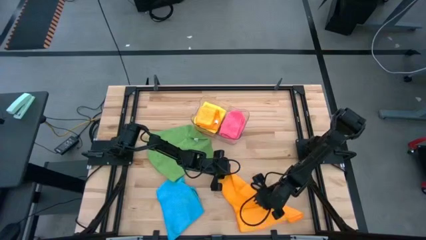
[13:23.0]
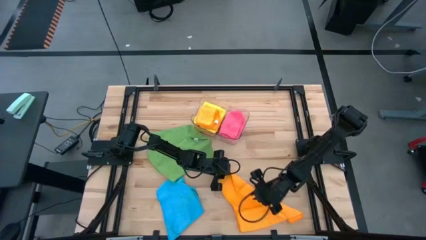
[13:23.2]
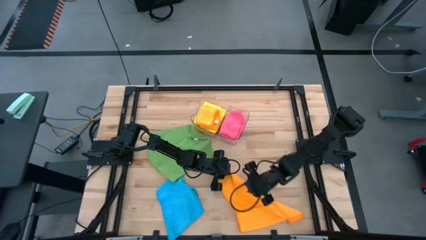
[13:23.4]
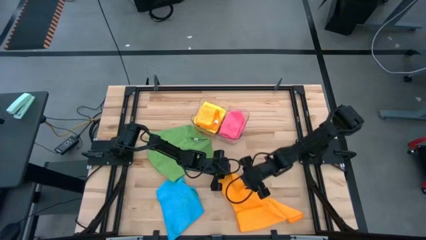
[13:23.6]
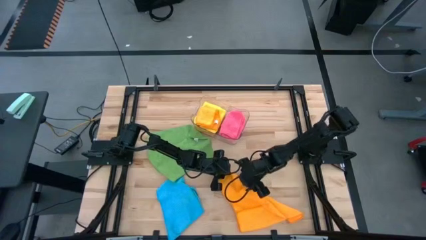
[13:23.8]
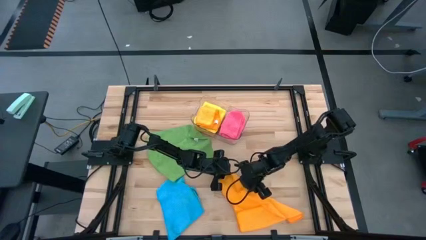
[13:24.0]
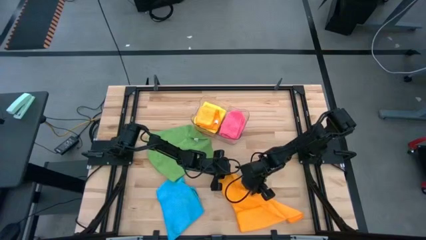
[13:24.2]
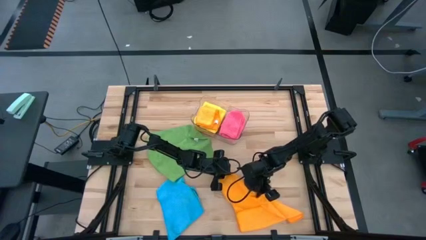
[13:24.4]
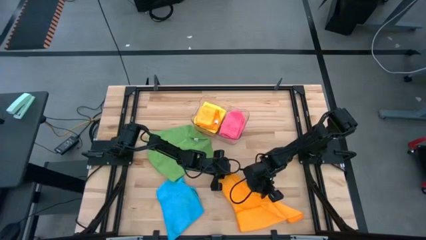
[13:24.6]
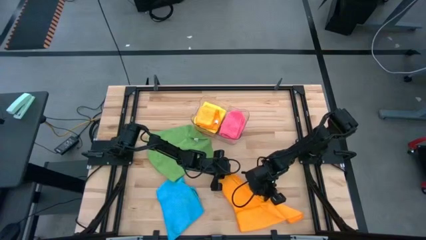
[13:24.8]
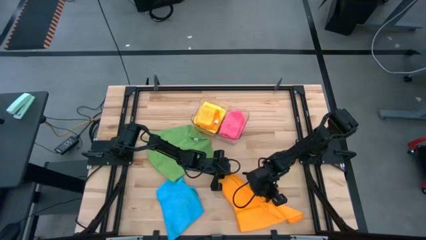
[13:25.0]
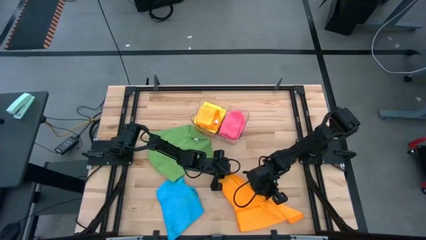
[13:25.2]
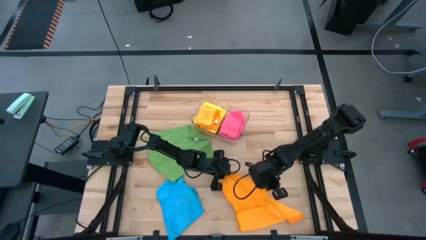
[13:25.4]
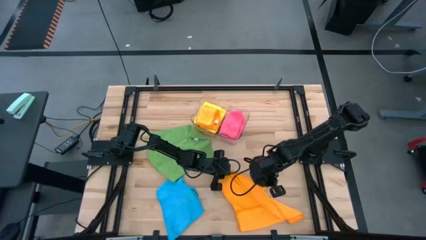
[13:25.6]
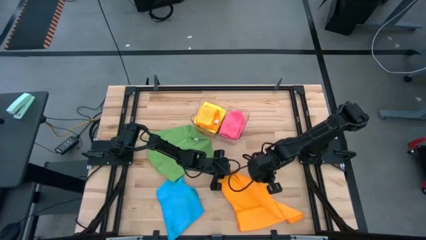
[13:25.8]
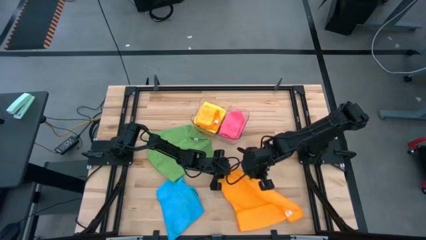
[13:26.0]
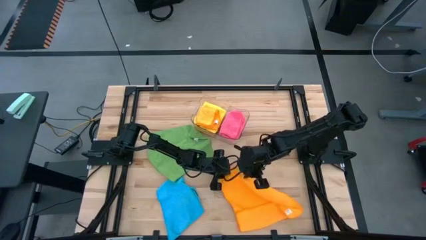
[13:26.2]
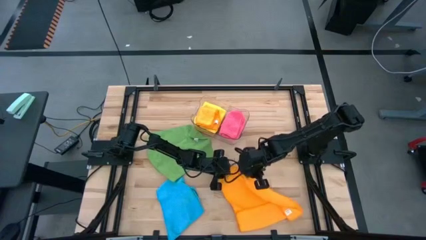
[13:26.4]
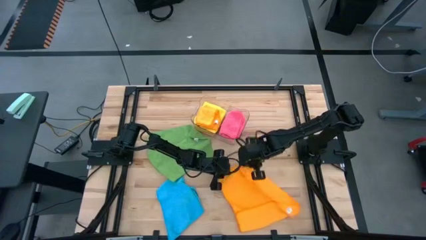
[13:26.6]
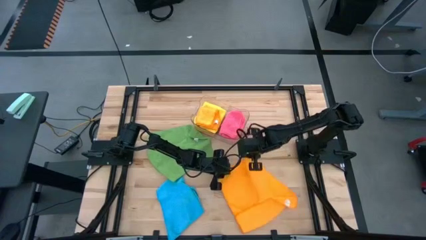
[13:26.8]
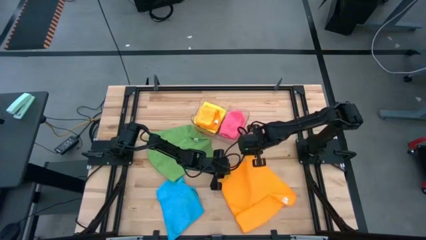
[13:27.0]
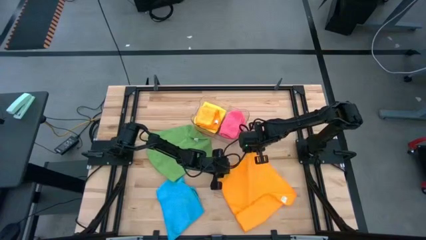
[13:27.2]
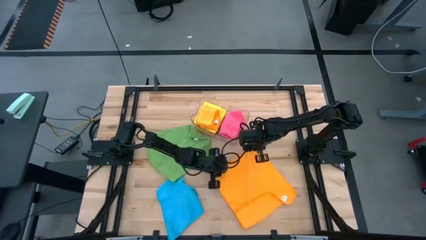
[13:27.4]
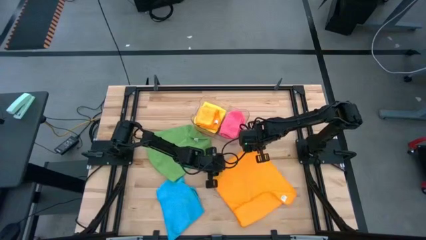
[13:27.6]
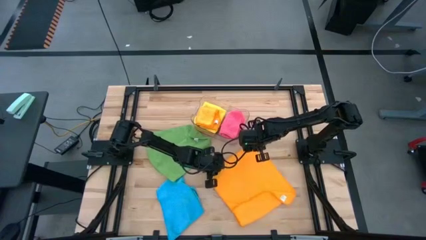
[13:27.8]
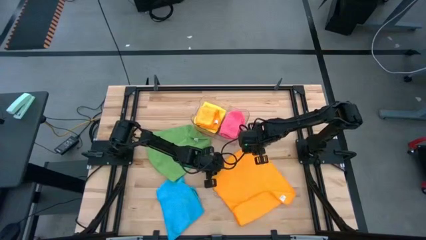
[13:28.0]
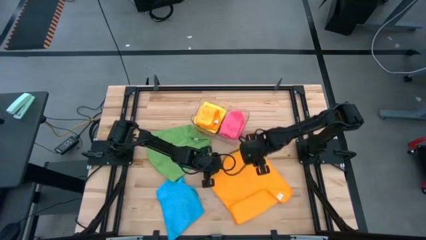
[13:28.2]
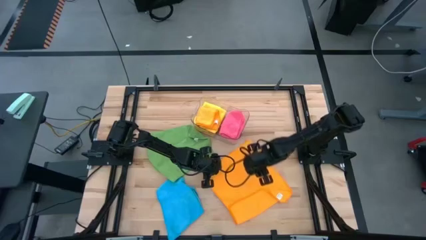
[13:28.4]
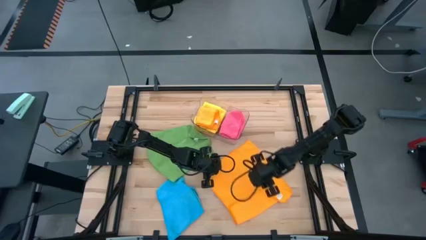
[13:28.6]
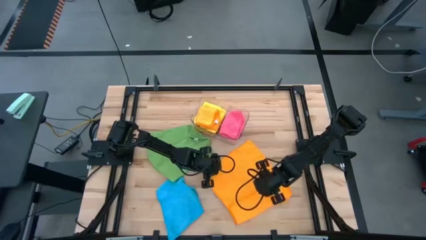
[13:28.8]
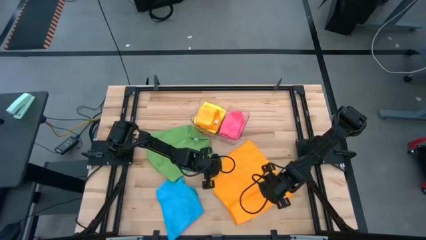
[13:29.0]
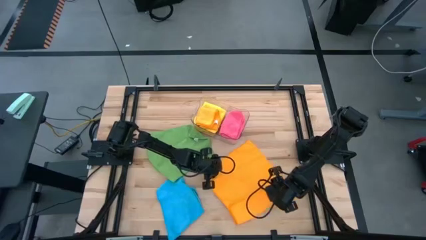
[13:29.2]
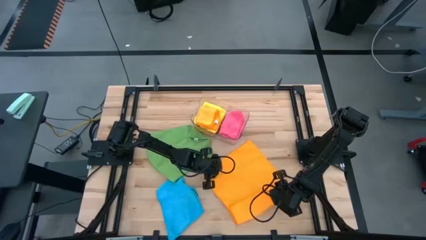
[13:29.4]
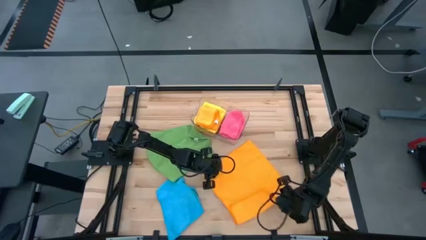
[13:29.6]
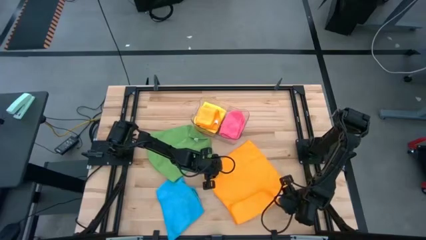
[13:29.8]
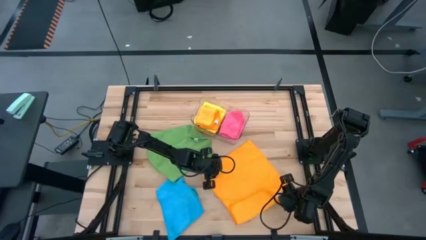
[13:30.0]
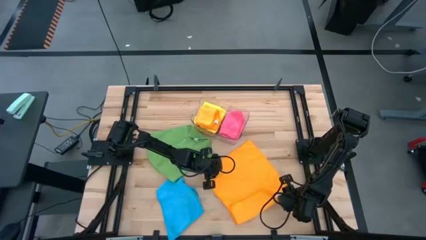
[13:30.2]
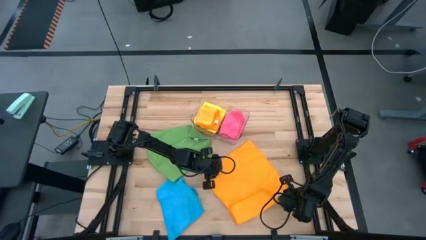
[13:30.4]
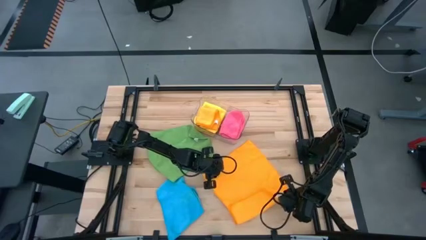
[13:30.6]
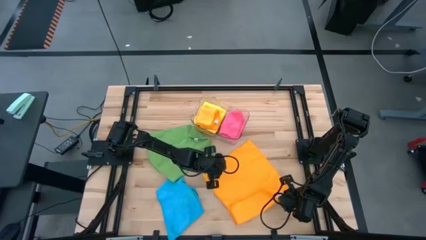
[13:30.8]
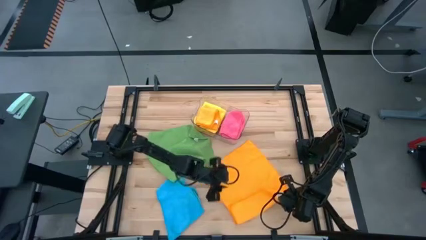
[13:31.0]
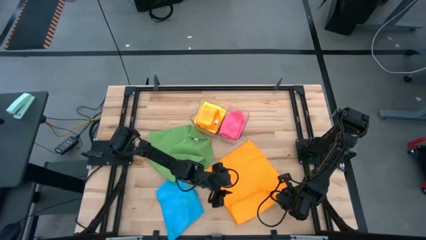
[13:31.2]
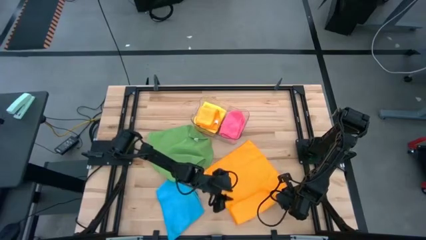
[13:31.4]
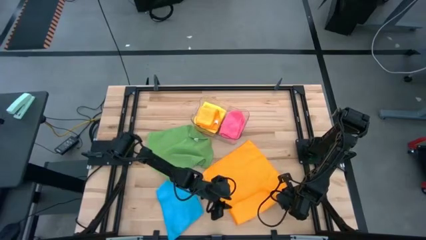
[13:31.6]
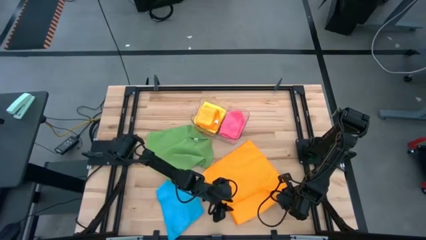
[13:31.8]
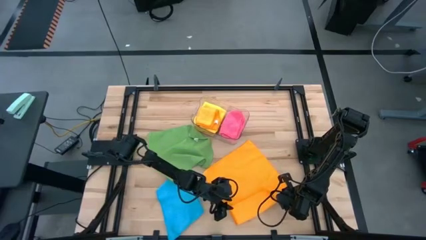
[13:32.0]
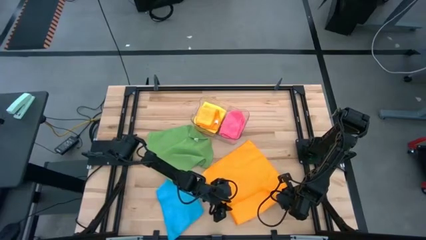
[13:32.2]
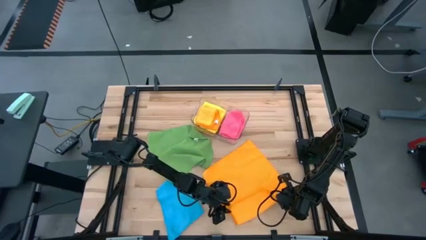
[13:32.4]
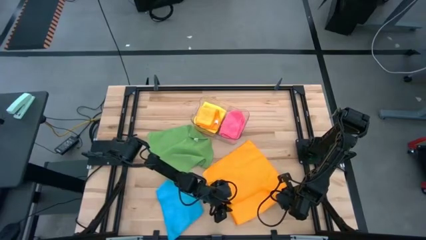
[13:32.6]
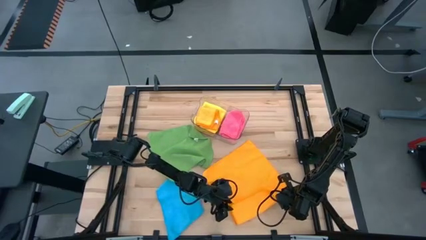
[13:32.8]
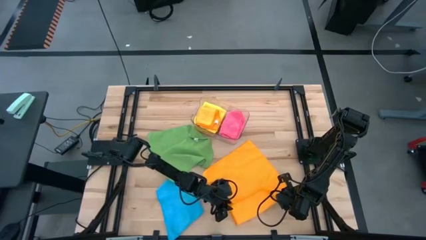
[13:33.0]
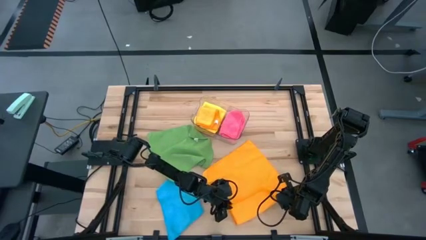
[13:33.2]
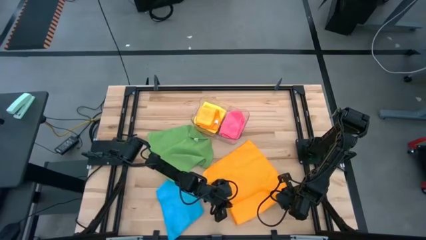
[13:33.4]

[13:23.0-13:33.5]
Task: Fold microfiber towels
Fold the orange microfiber cloth

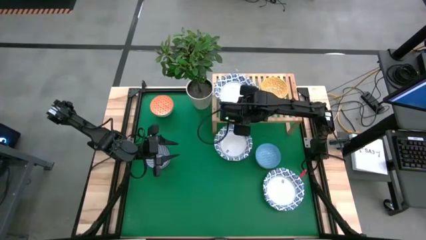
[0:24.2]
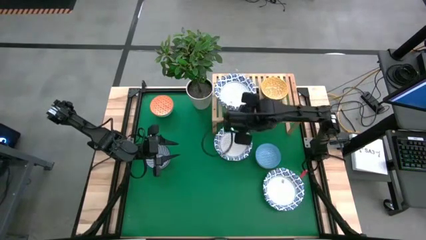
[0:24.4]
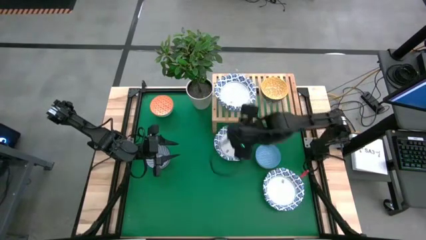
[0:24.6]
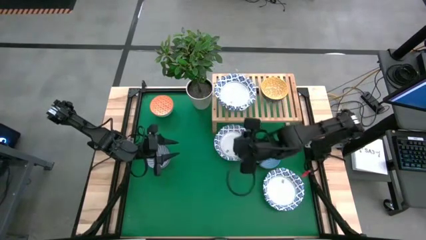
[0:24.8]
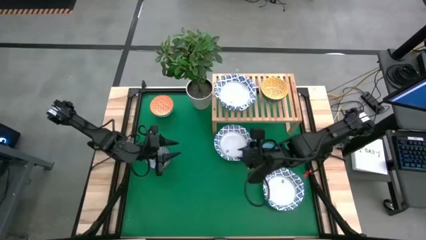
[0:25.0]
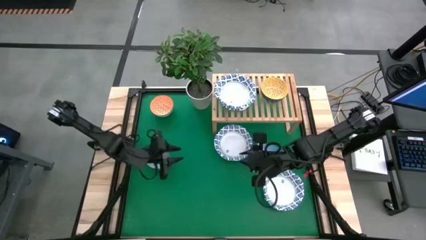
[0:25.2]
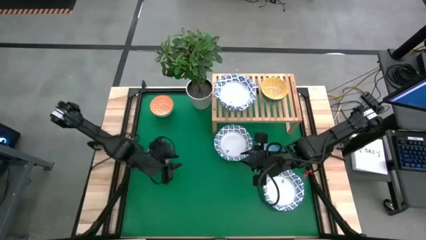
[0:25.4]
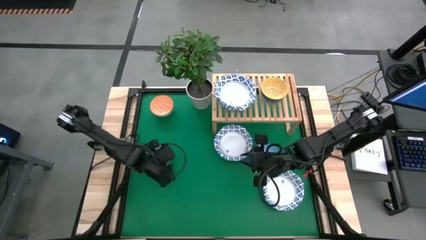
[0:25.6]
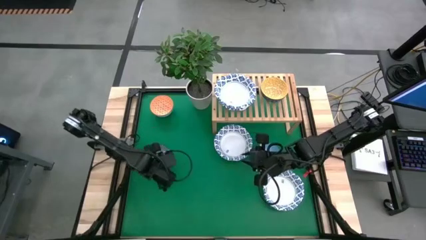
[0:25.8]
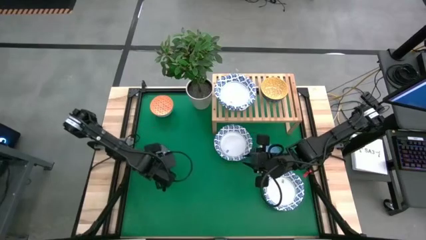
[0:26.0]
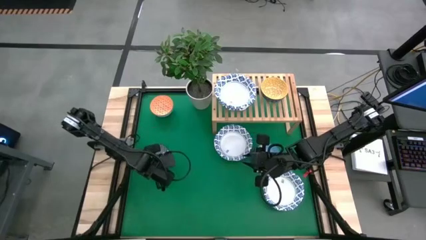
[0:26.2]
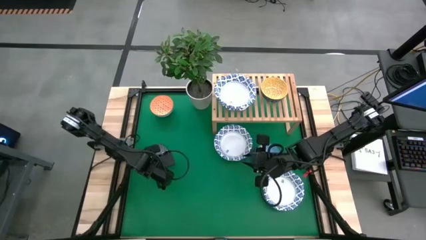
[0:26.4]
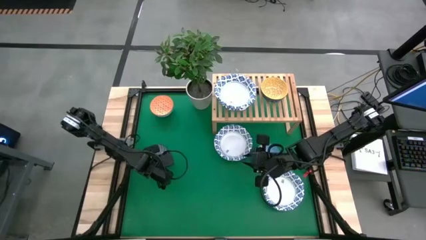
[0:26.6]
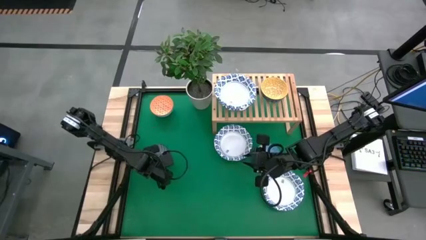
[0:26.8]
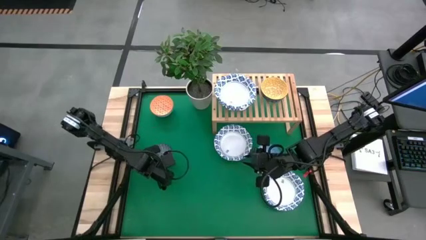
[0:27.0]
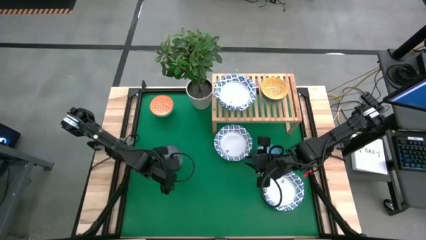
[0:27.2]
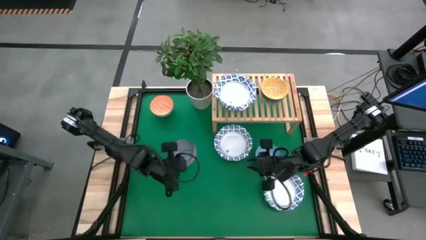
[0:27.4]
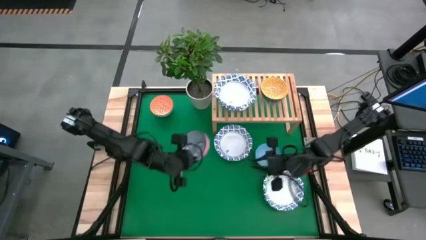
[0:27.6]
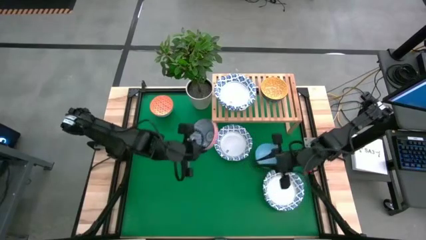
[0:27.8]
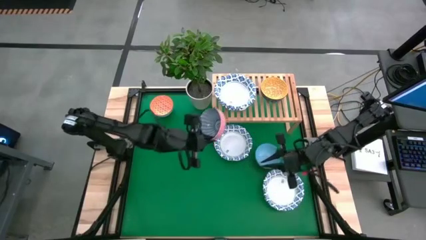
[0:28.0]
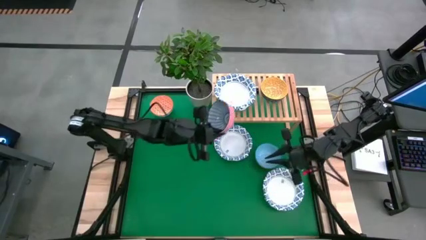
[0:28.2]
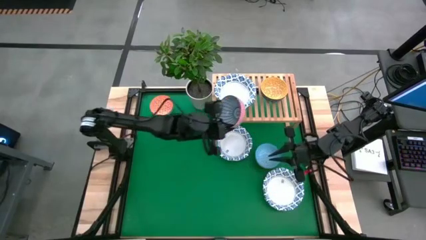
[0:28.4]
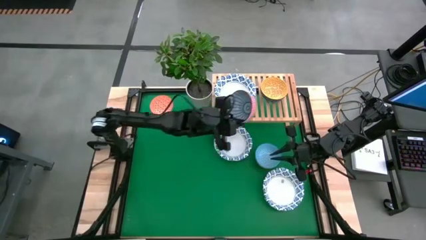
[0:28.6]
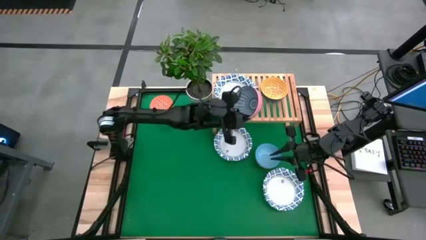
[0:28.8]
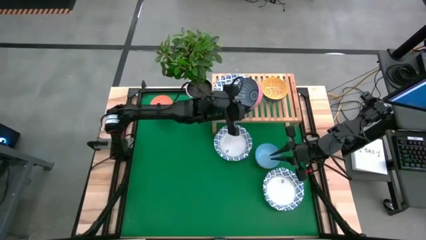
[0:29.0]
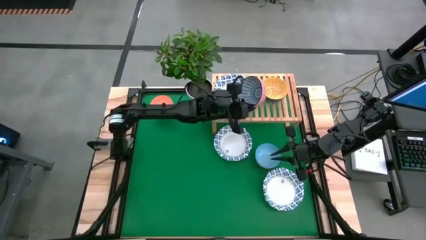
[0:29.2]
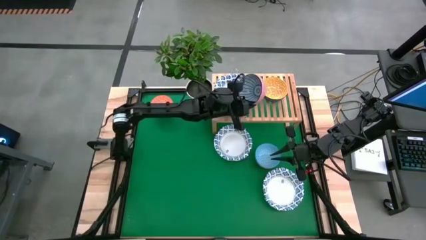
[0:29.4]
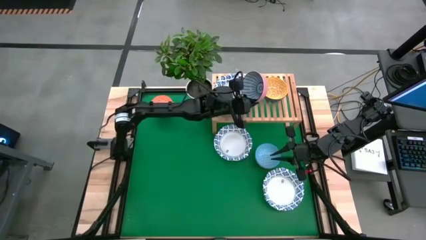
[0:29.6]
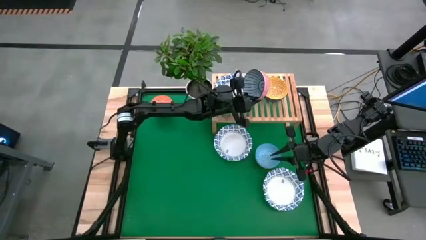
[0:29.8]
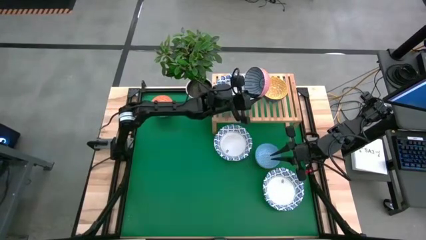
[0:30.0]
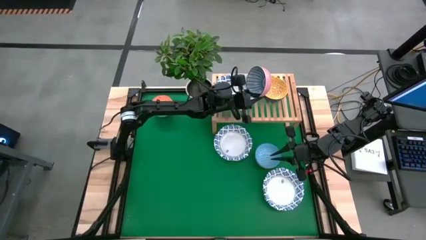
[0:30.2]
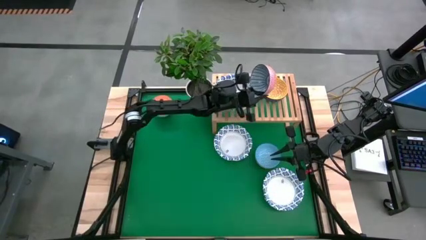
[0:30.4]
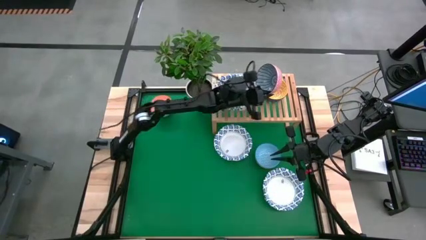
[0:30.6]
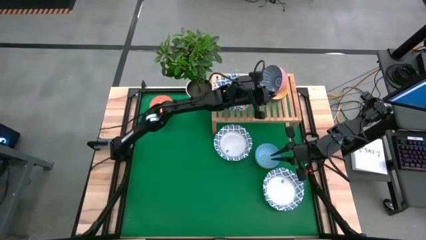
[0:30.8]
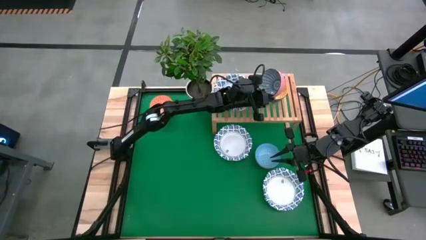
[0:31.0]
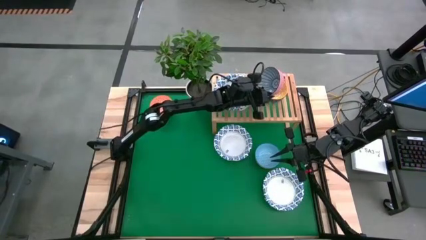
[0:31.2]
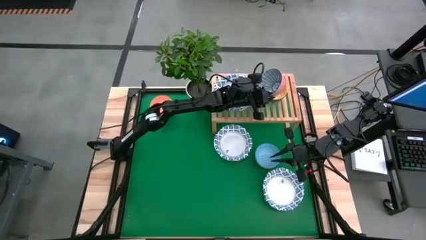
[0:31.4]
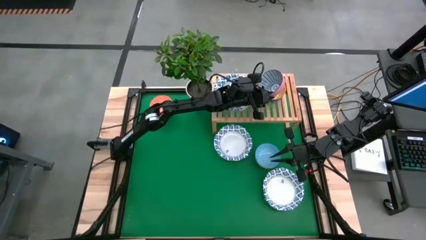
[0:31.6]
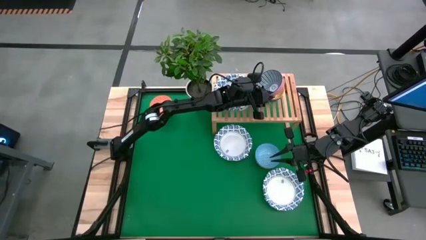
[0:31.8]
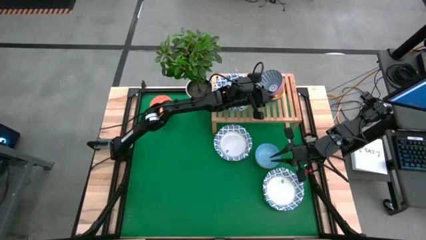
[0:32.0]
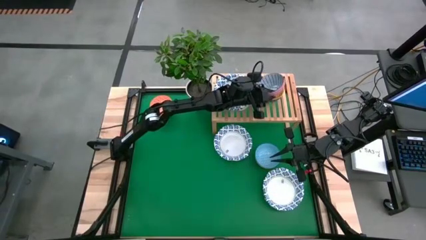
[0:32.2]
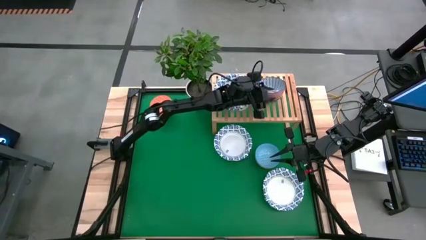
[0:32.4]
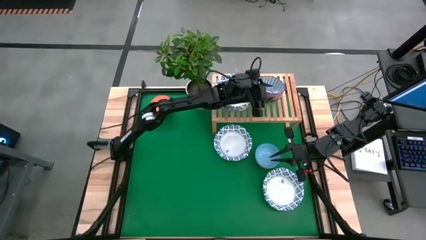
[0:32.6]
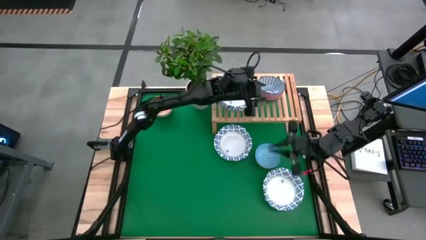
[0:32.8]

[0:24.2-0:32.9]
Task: Place and stack bowls onto a shelf
Stack the blue bowl on top of the yellow bowl on the shelf
